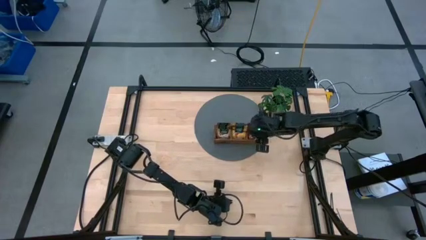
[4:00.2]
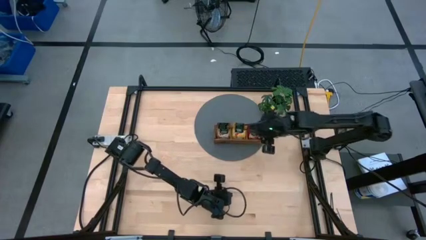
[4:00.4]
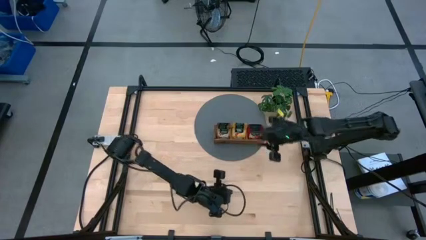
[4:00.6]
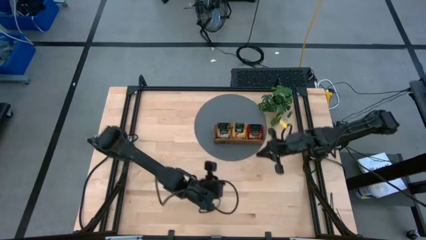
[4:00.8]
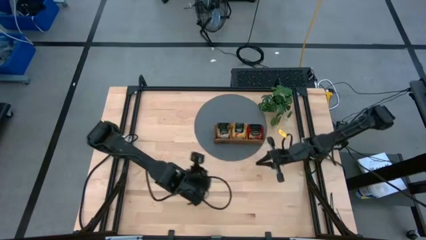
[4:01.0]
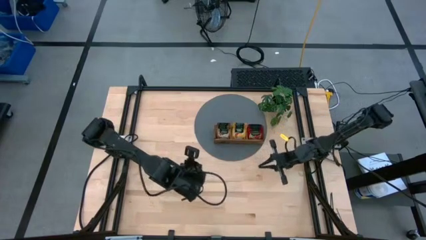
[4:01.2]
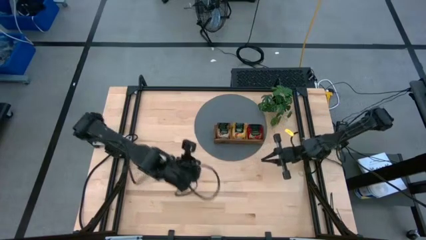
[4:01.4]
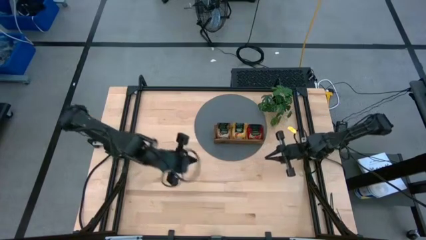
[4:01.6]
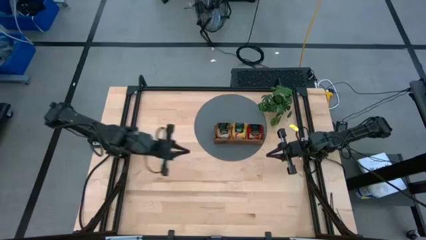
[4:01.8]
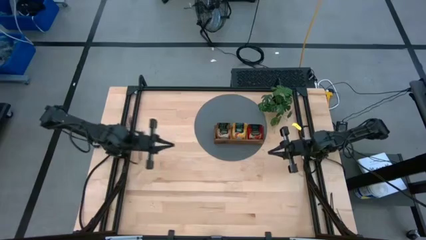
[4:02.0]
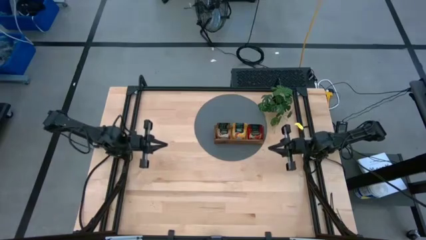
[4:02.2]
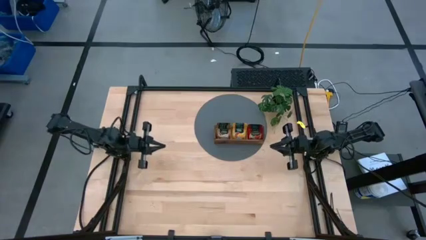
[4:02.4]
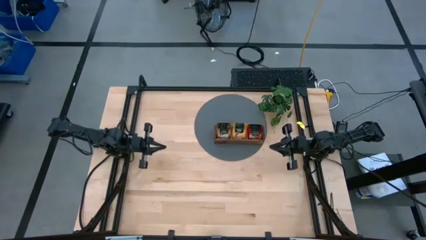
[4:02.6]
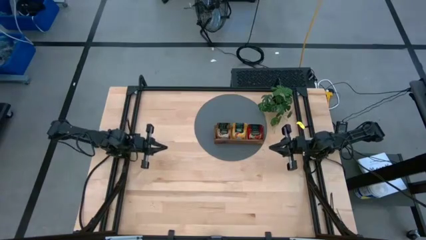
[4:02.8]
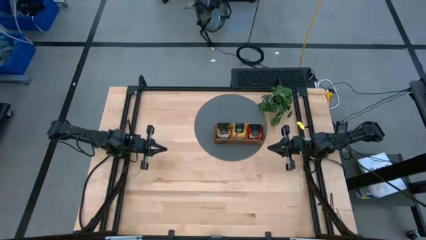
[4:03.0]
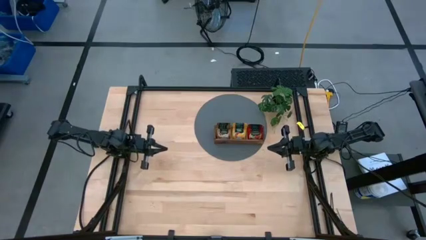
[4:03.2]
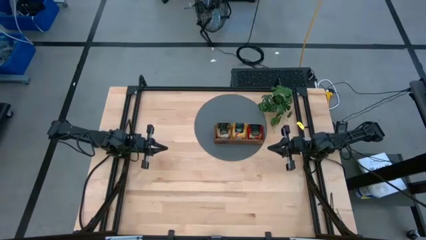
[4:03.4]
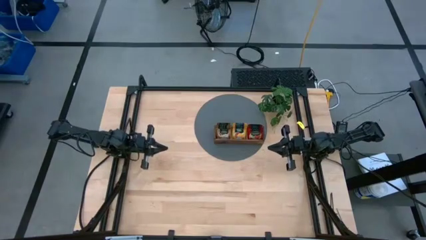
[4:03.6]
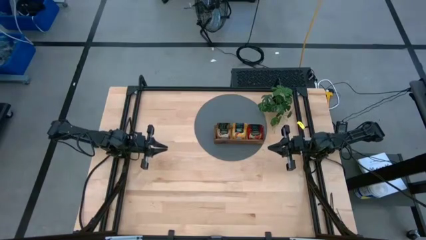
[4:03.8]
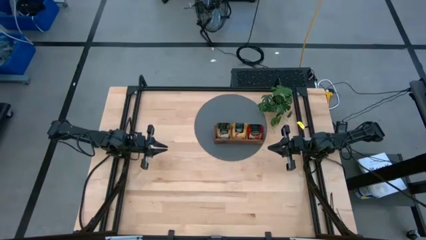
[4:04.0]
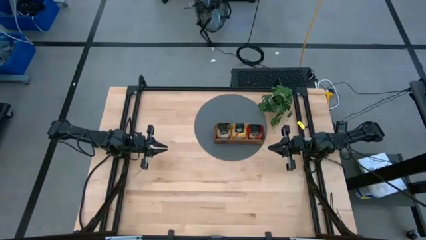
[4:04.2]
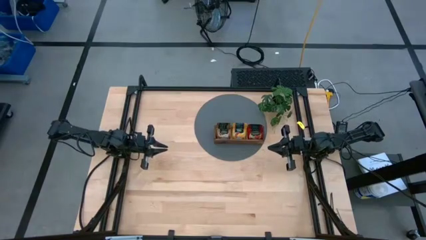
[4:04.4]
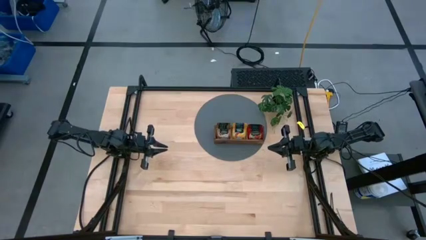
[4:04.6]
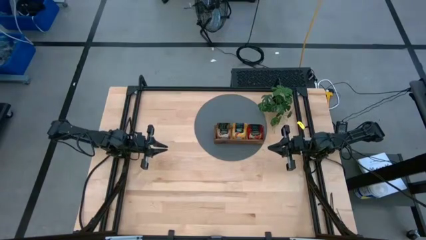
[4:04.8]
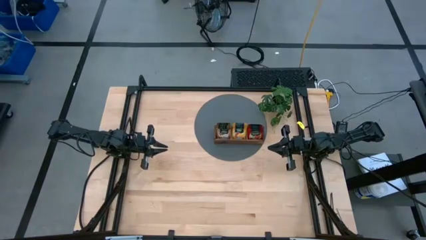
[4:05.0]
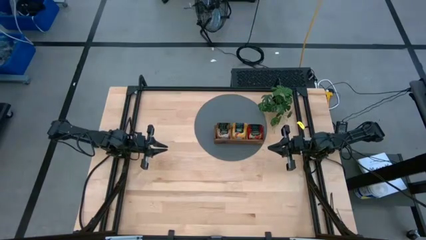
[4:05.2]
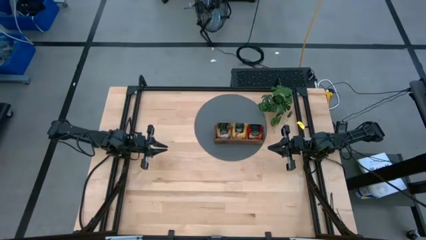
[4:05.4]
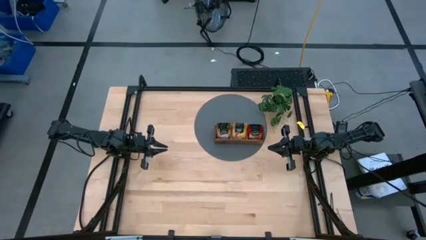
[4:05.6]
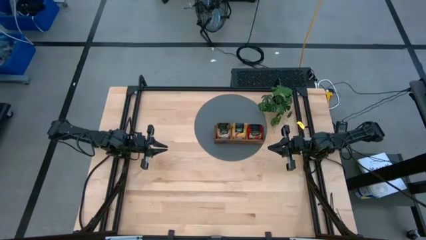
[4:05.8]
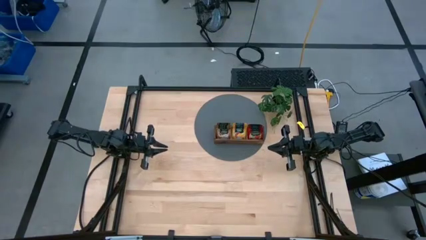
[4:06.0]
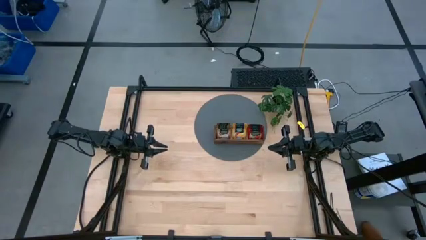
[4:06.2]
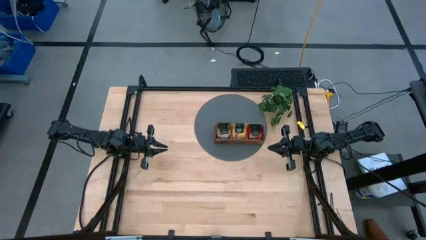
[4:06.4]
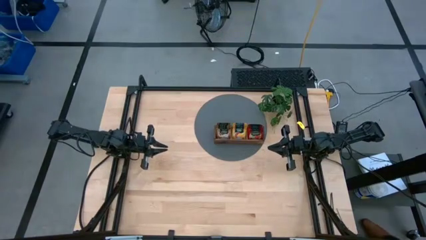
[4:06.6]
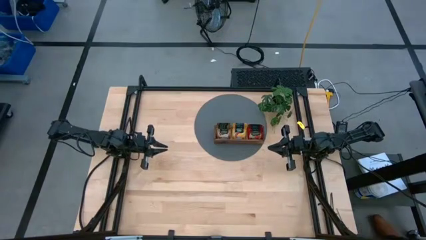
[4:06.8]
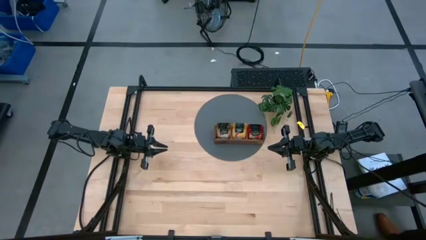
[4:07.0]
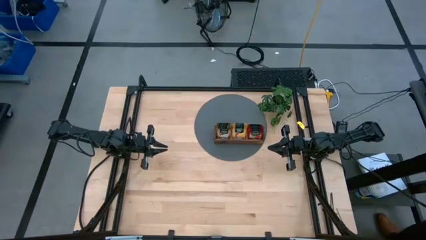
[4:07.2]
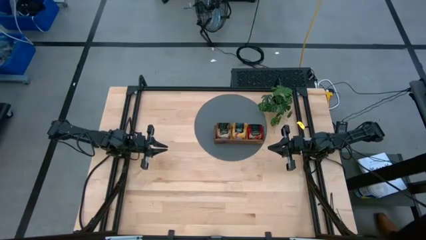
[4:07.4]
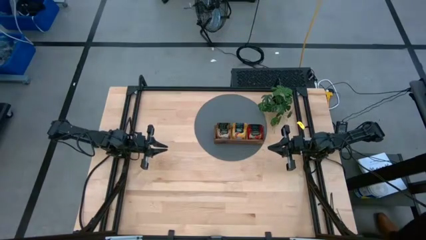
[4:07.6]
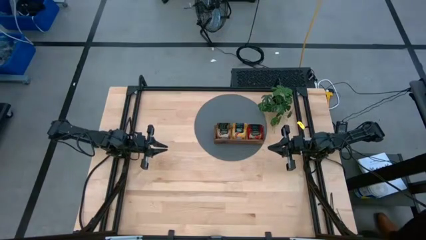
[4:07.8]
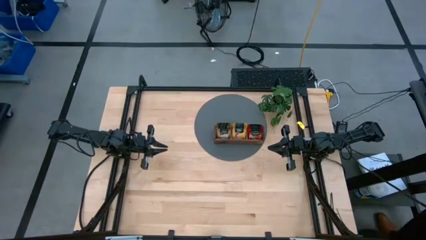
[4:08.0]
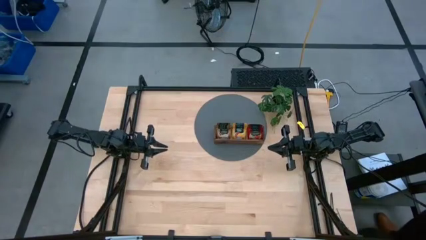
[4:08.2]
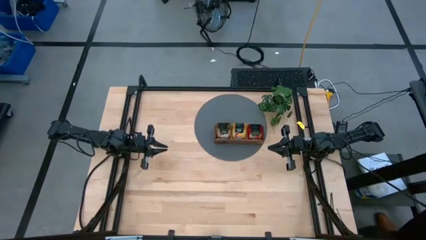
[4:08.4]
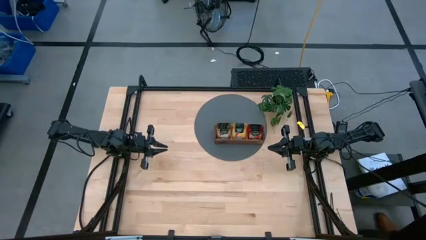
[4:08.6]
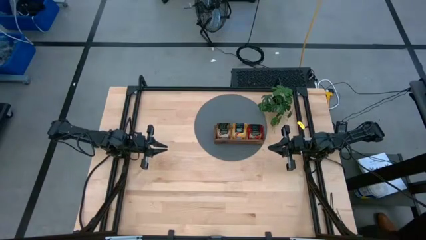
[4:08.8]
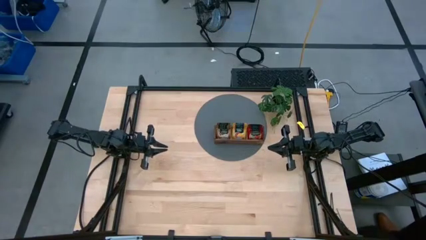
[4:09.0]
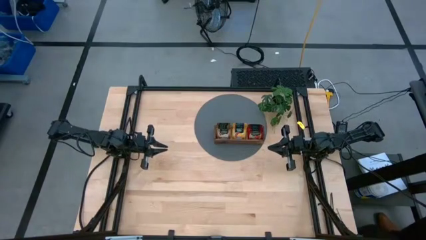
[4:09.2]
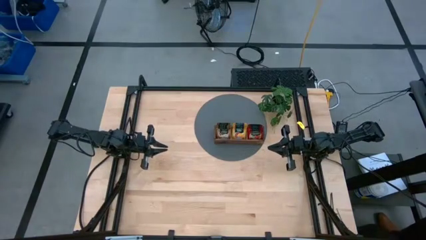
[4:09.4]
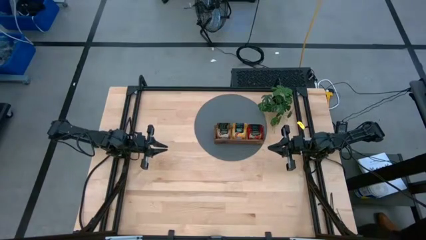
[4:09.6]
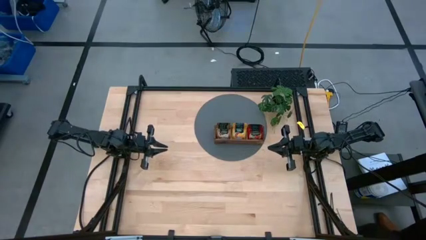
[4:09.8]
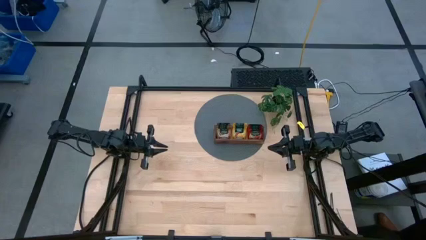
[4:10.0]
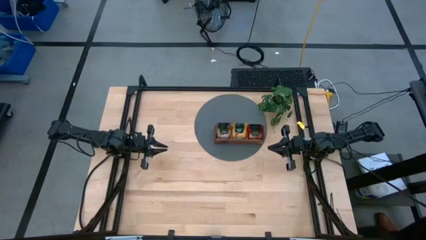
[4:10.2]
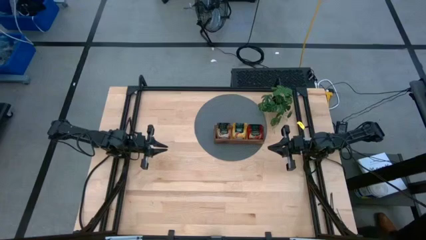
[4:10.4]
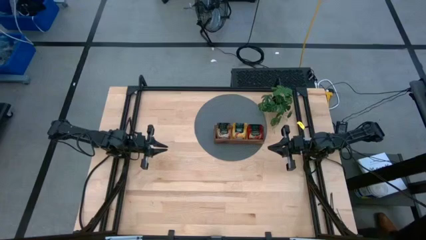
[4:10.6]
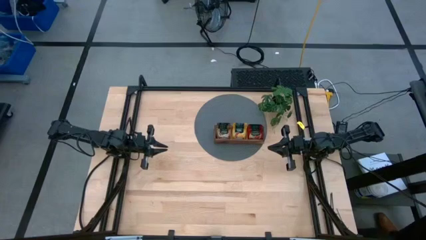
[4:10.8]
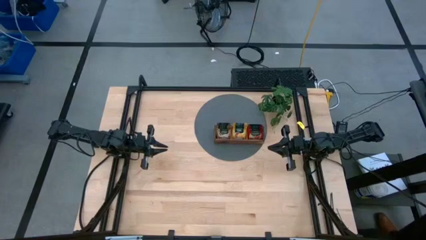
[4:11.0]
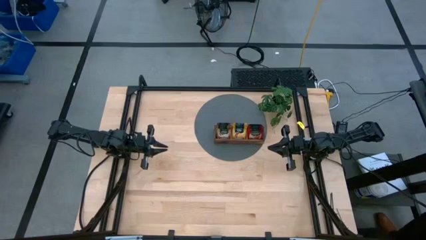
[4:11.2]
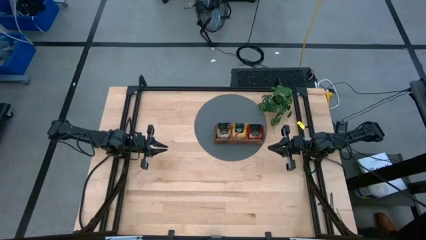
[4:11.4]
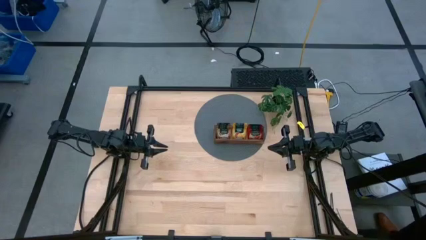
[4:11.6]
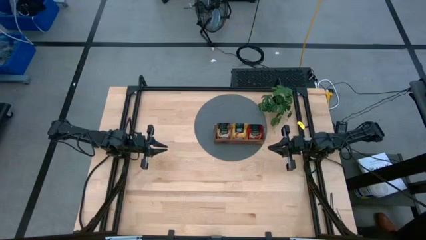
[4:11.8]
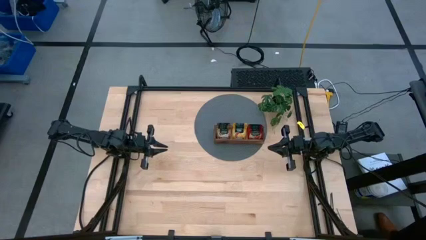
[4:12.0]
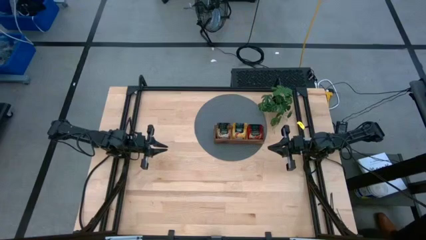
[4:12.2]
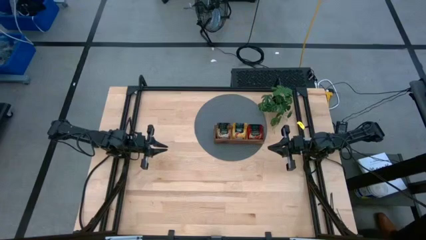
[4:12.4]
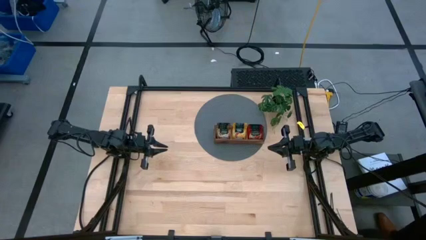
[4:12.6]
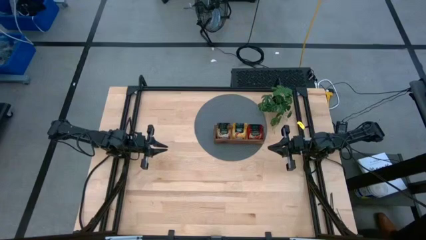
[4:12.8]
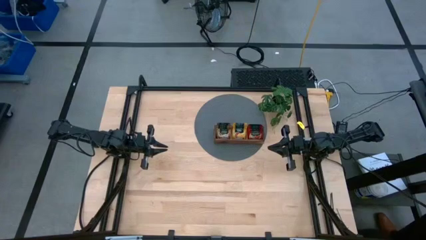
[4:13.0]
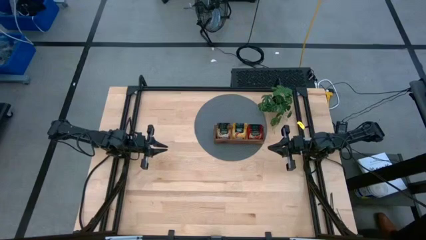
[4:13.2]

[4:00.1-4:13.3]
Task: Pick & Place Tea
Return to Home Position

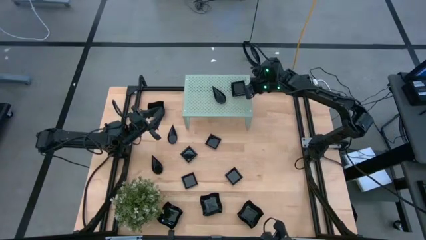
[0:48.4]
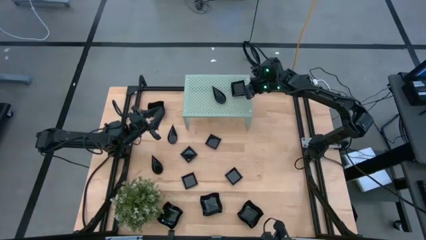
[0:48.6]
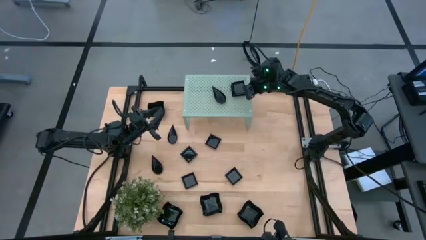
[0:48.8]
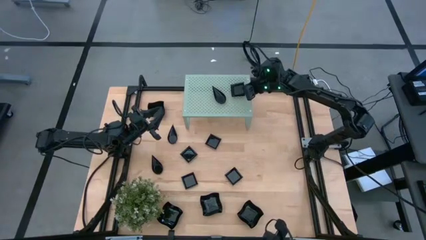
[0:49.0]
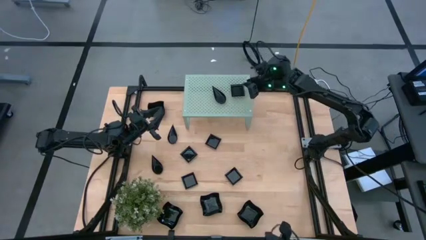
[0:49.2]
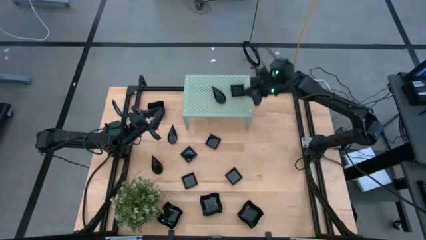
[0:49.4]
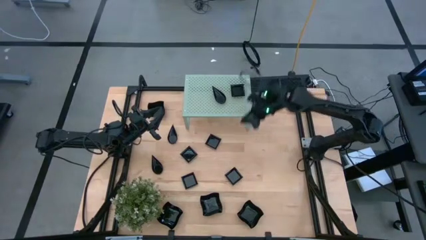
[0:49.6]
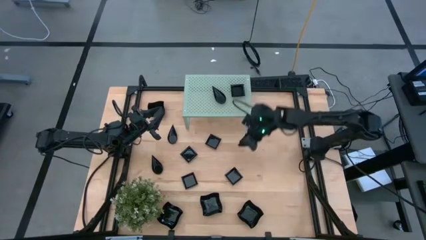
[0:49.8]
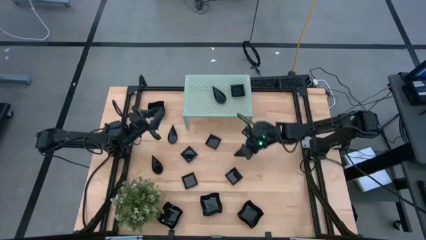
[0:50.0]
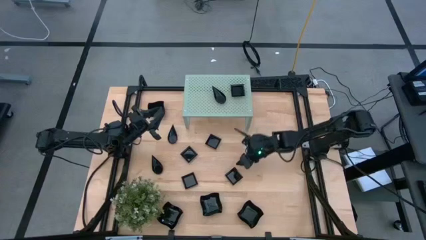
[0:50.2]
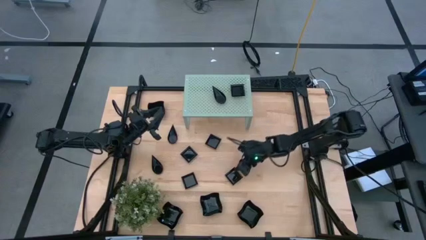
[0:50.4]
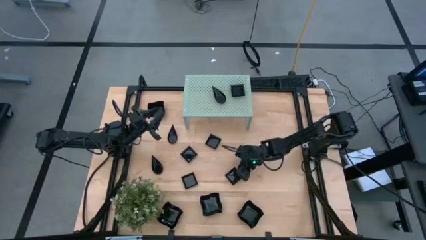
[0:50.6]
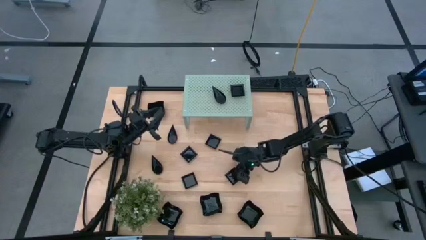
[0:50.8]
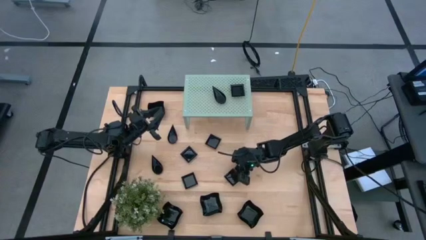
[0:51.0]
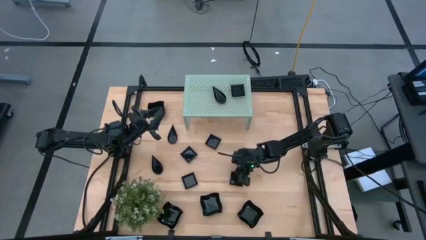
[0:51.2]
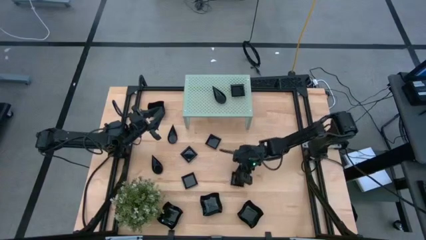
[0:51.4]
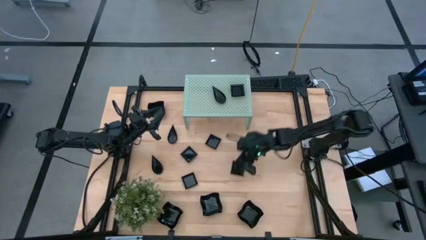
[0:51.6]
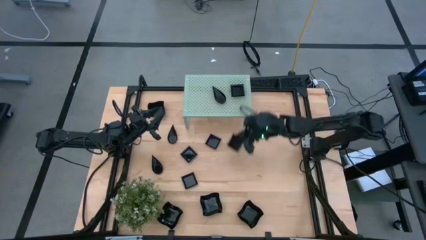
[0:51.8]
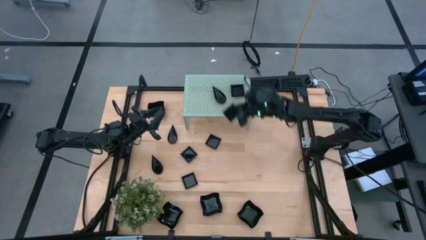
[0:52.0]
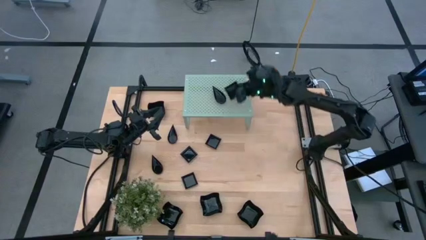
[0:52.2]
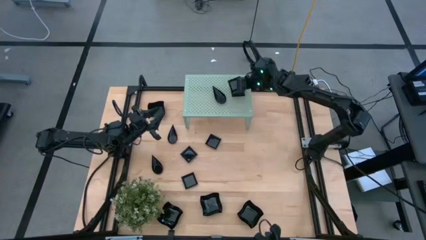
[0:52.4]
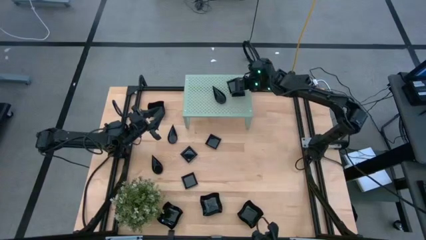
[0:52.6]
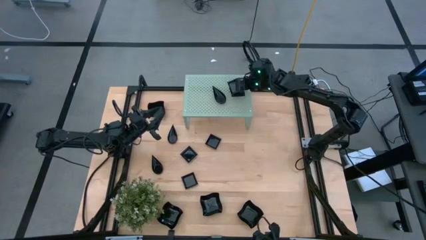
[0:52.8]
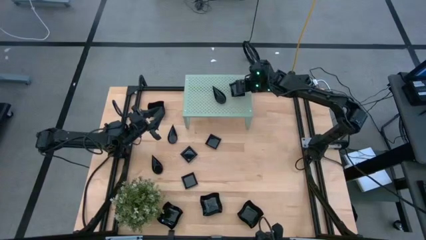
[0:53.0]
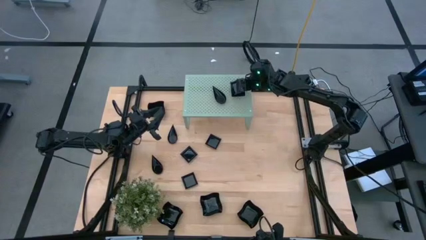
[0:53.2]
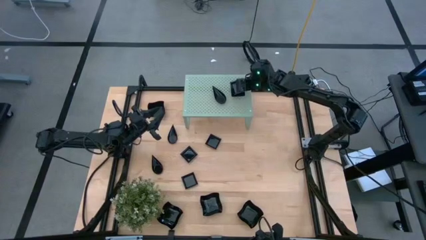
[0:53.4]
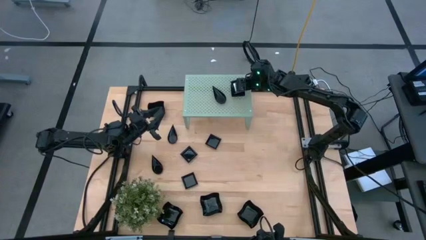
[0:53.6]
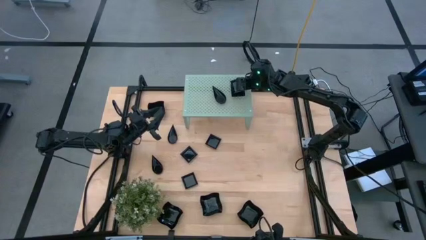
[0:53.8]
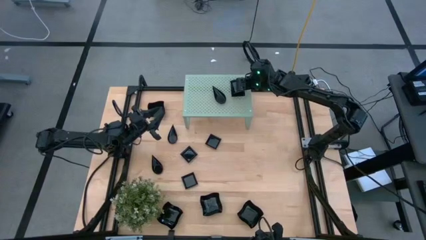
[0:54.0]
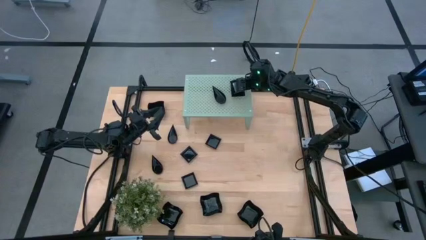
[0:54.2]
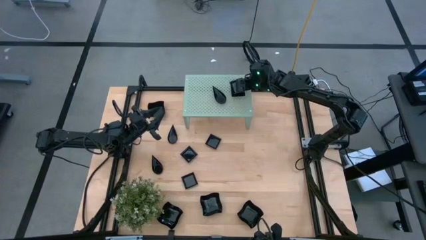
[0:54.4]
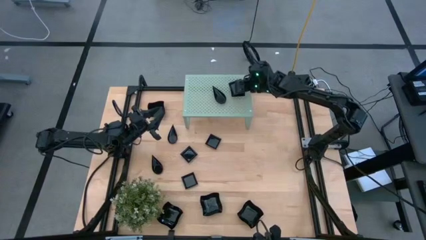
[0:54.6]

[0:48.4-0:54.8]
Task: Pick & Place Mini shaped plates
Stack the black square plate on the shelf
